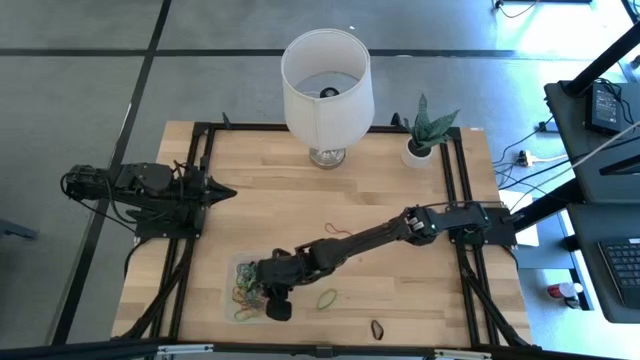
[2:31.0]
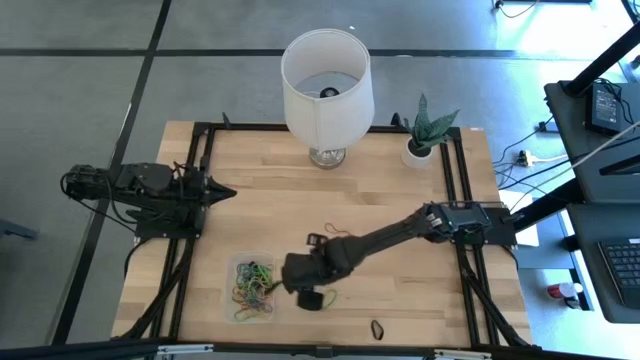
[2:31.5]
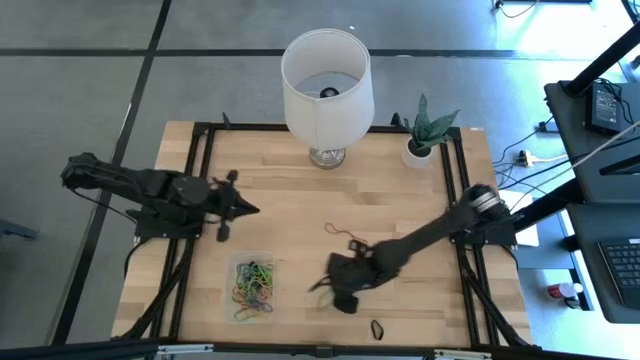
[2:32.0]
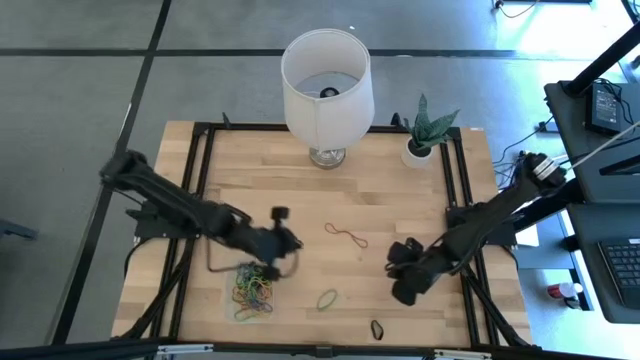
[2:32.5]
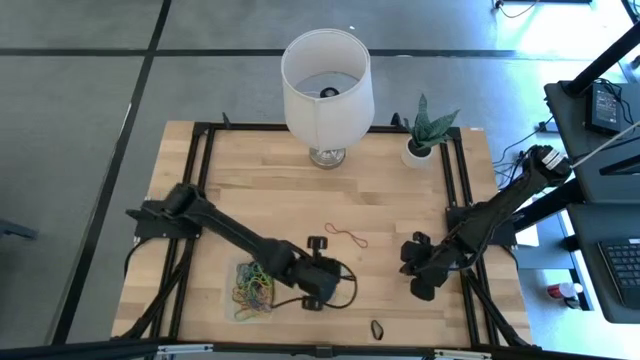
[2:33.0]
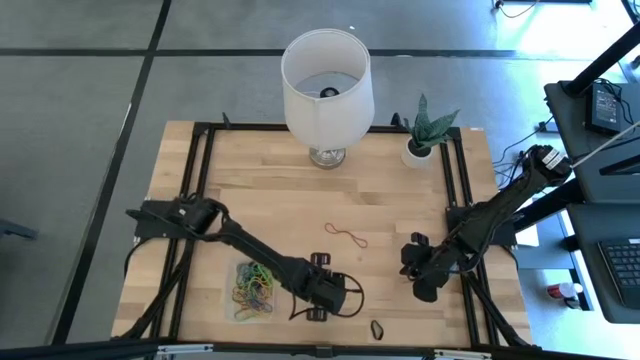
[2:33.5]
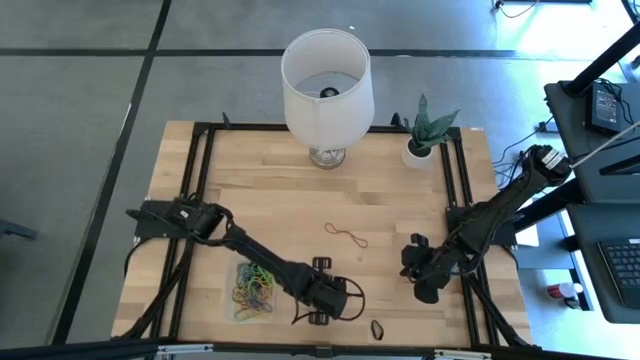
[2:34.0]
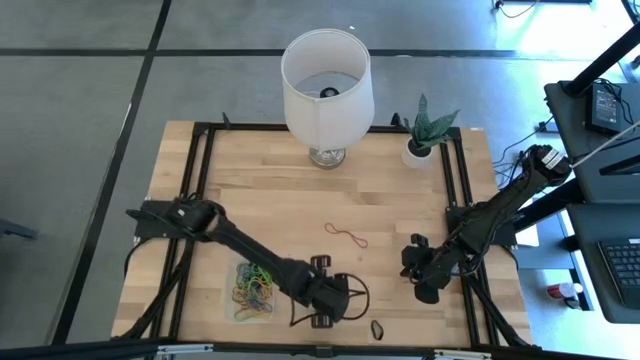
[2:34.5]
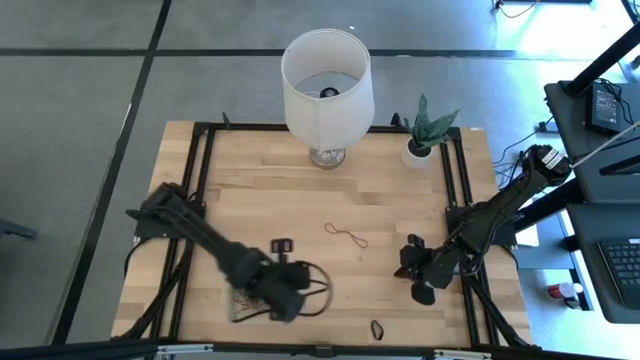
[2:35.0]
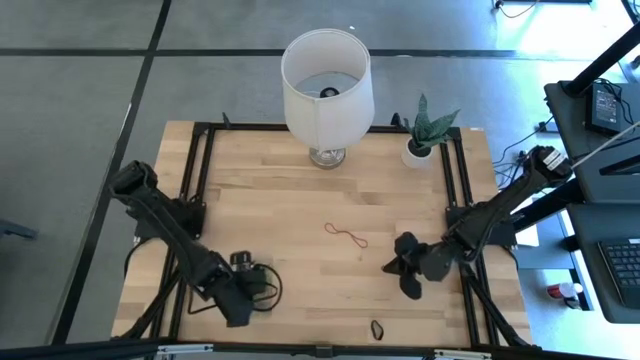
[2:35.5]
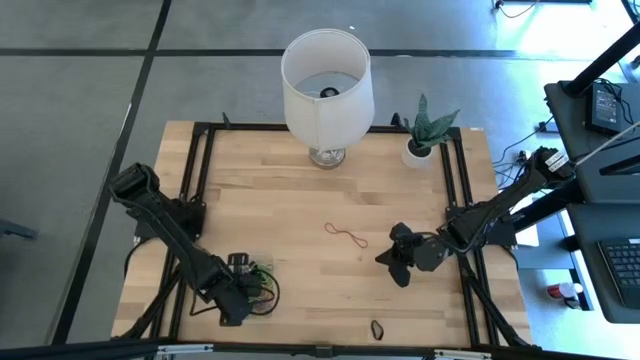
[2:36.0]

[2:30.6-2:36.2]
Task: Pick and place rubber bands into bin
Put the green rubber band into the transparent bin

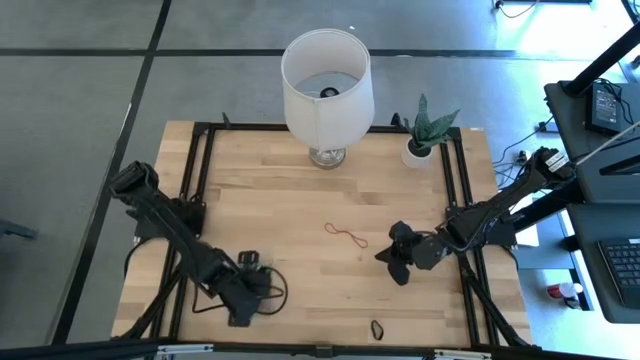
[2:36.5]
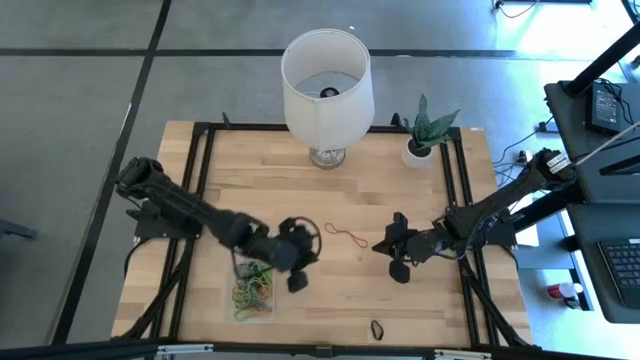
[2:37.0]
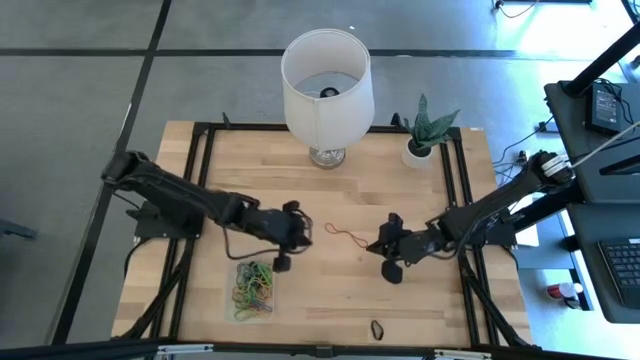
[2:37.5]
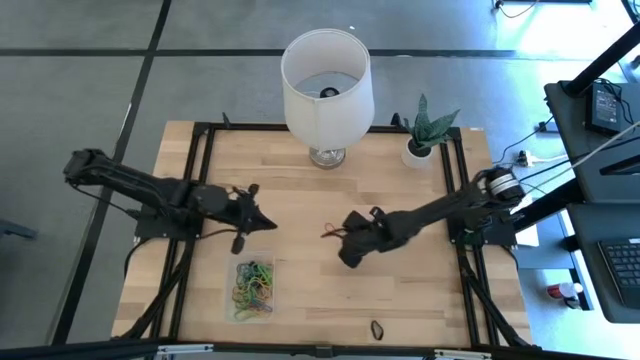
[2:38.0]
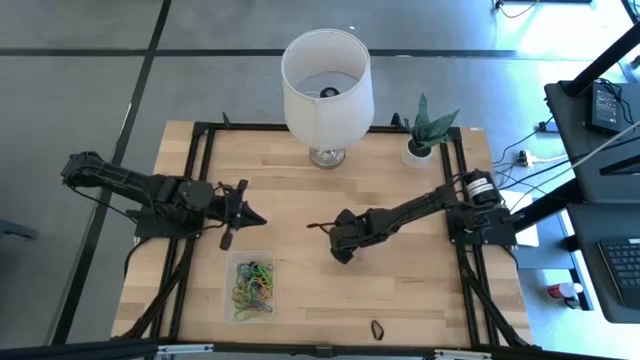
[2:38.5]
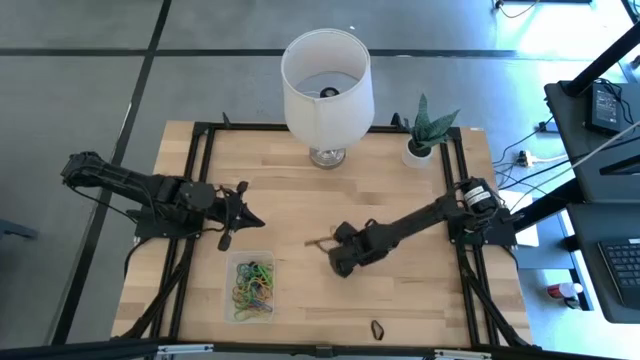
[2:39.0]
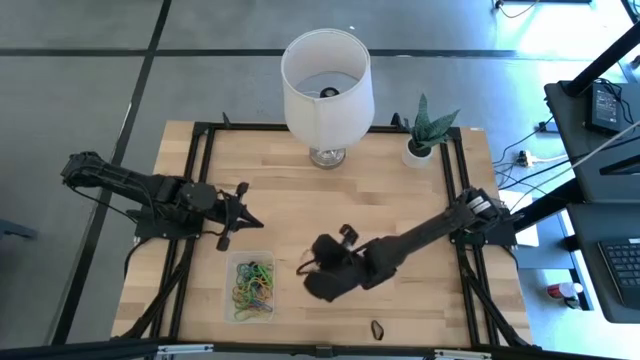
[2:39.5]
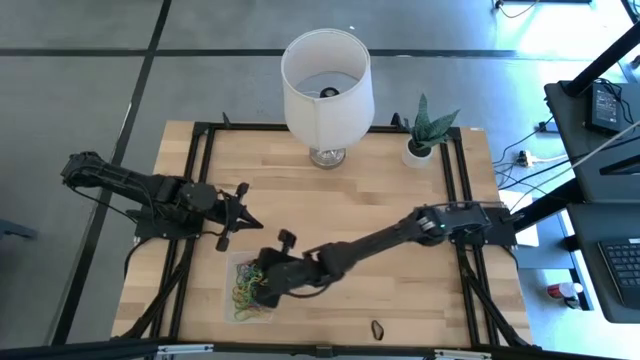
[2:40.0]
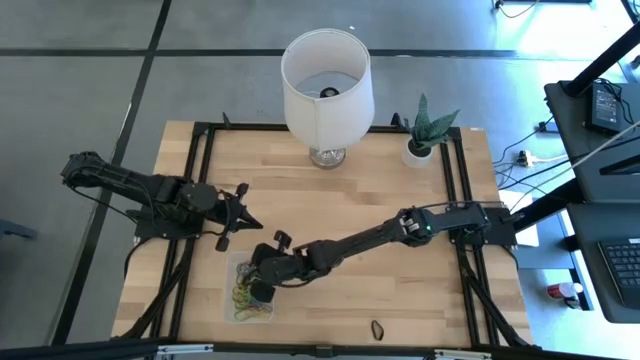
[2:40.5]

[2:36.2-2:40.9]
Put the red rubber band into the transparent bin

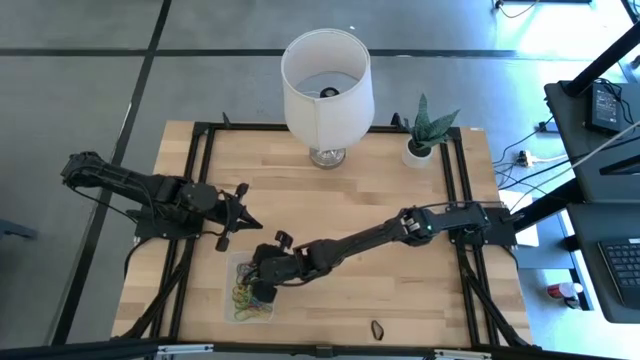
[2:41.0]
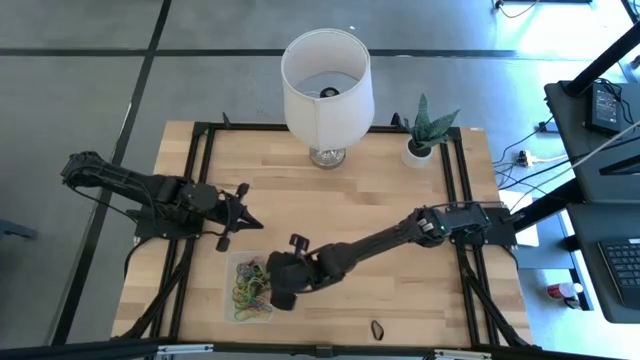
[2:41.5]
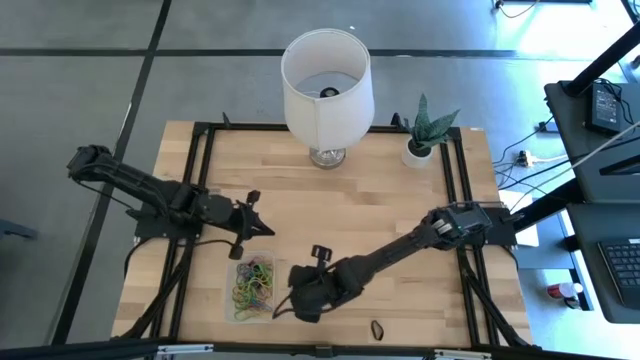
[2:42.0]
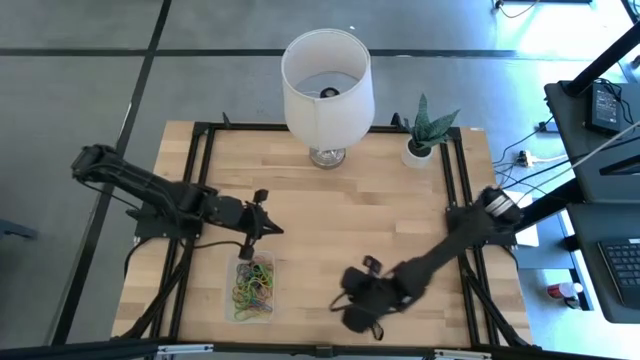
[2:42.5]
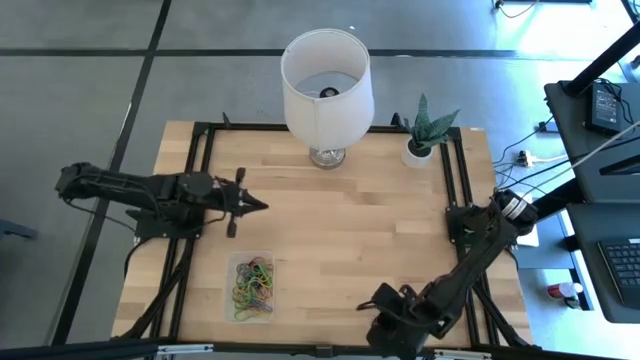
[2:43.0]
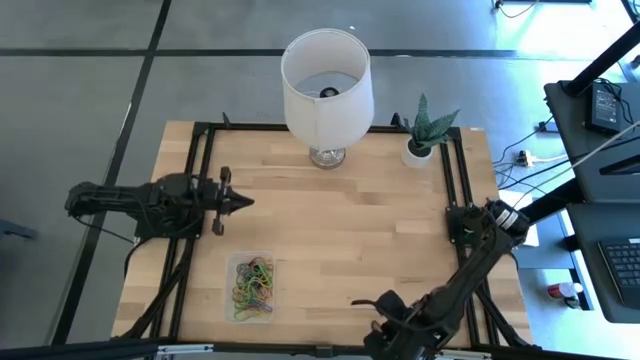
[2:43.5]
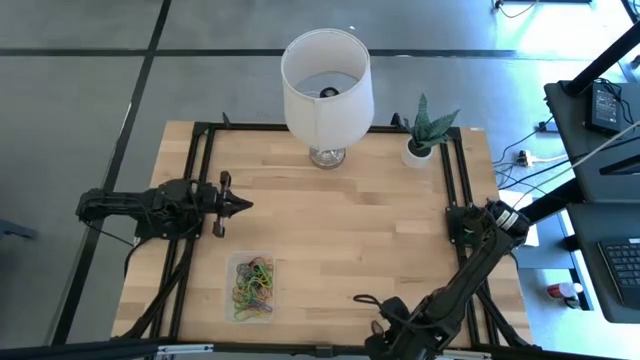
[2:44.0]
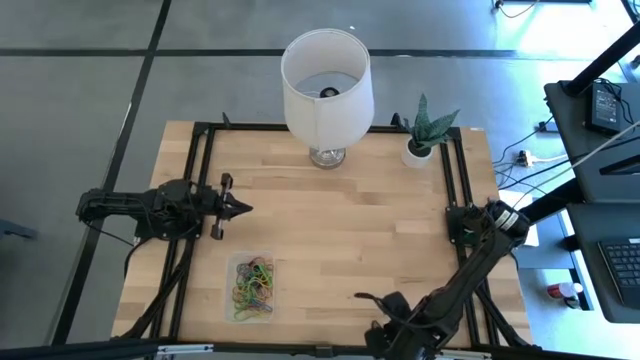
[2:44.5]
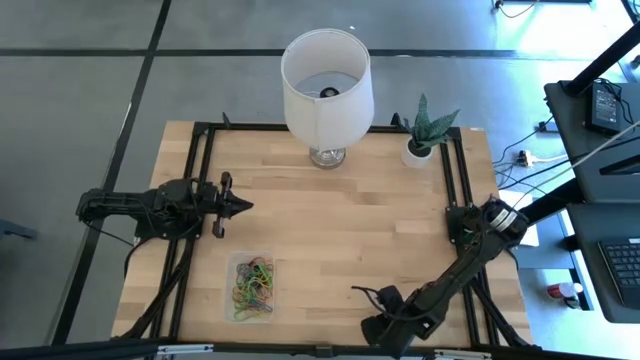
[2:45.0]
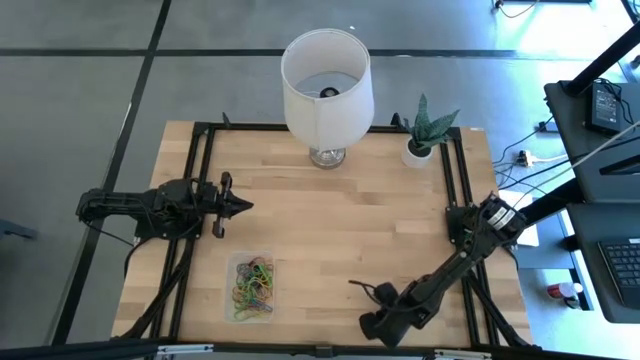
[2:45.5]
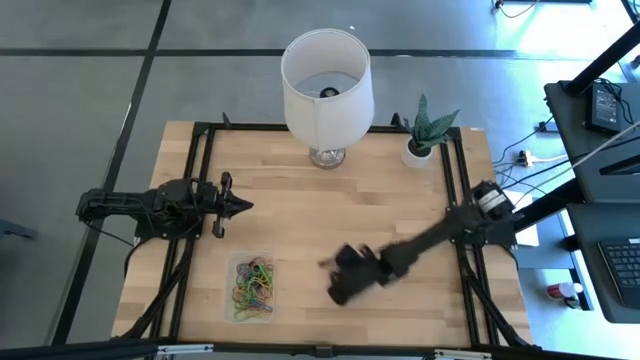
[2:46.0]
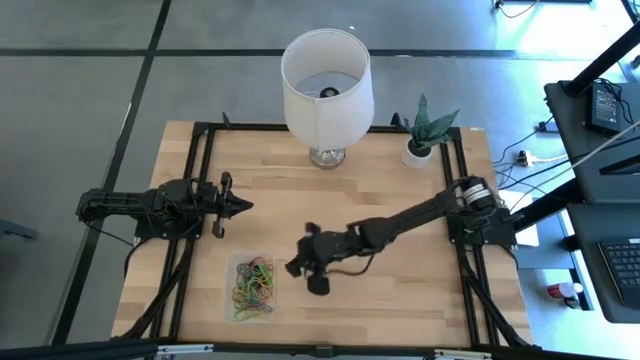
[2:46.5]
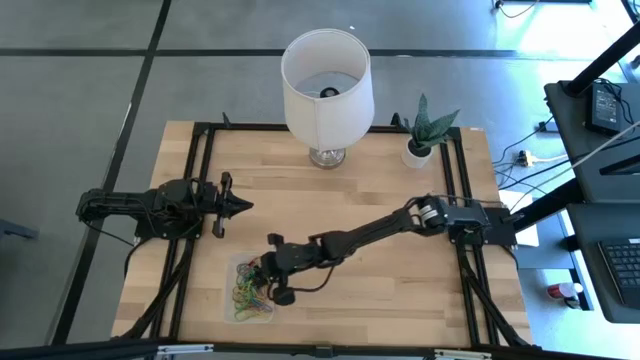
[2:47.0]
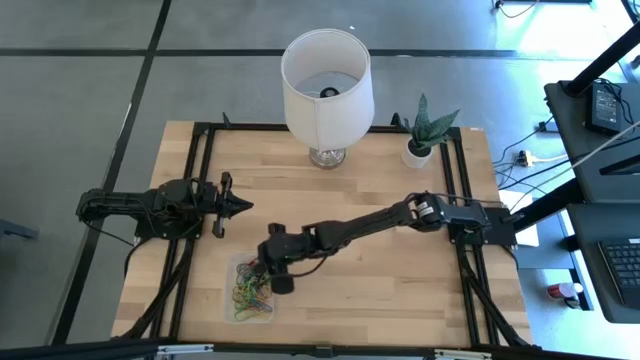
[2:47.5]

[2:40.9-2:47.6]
Put the black rubber band into the transparent bin

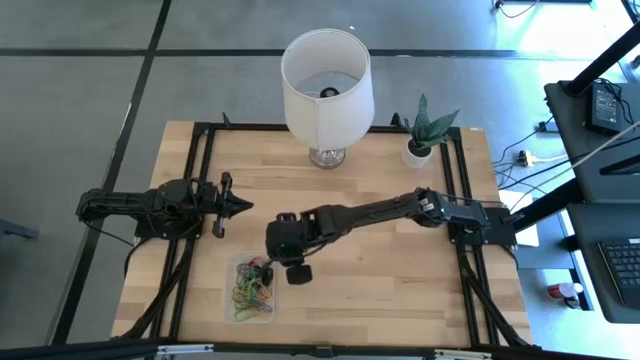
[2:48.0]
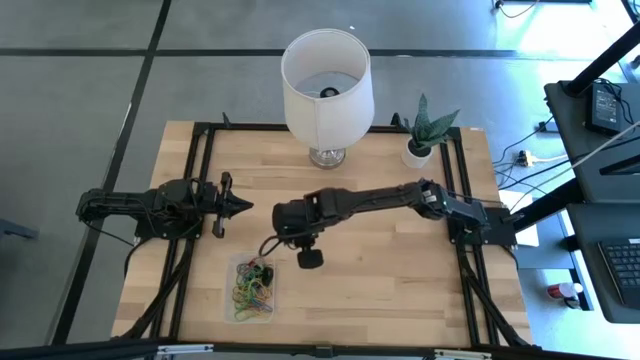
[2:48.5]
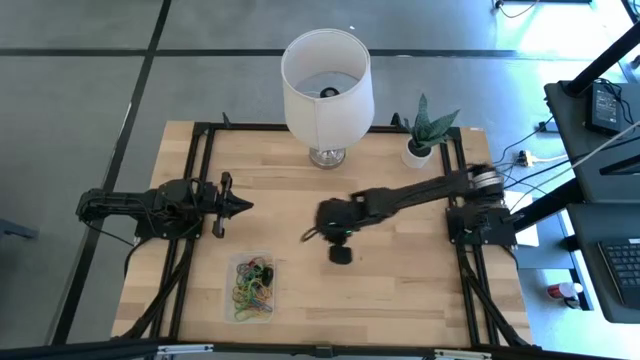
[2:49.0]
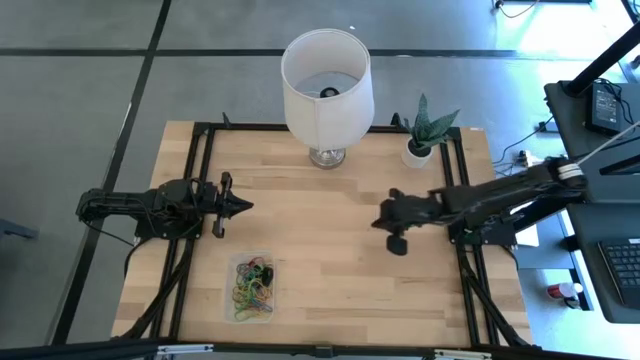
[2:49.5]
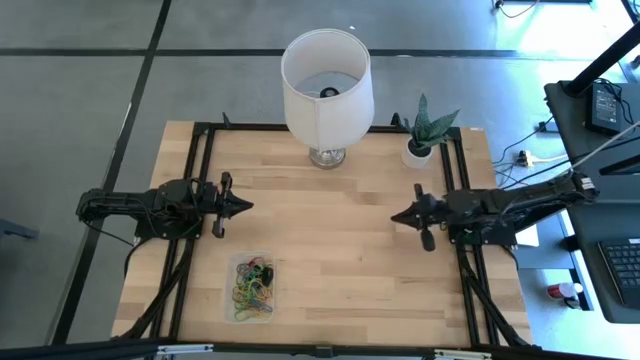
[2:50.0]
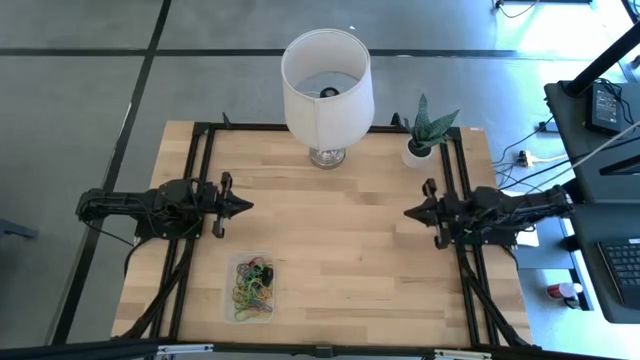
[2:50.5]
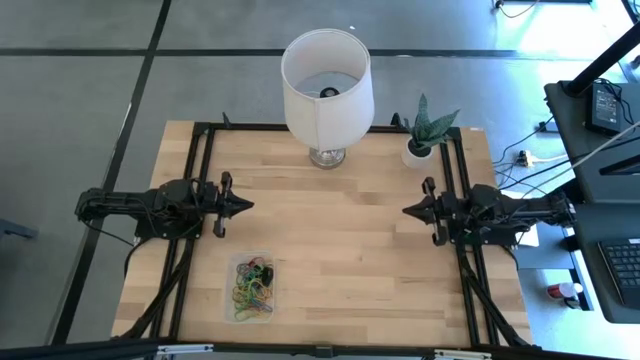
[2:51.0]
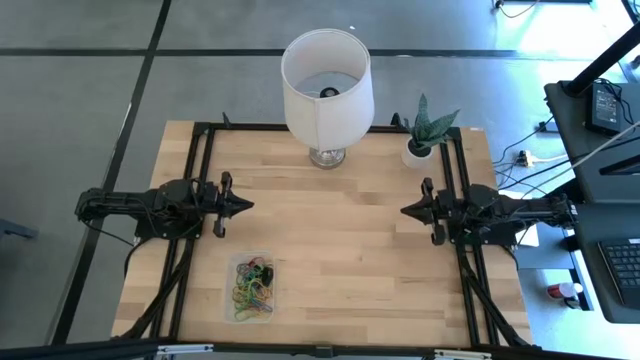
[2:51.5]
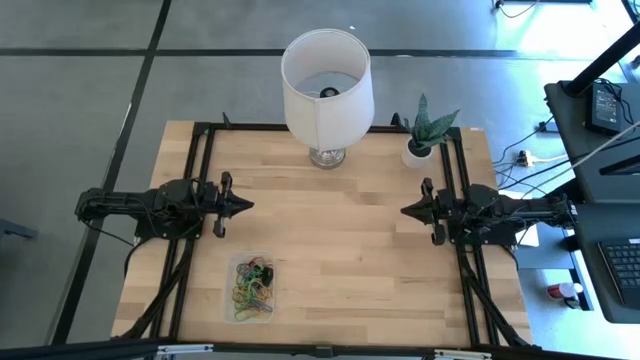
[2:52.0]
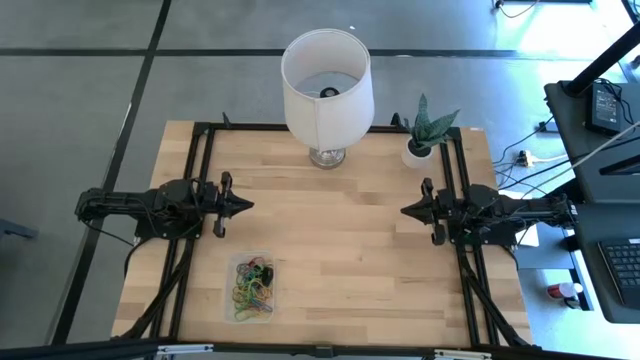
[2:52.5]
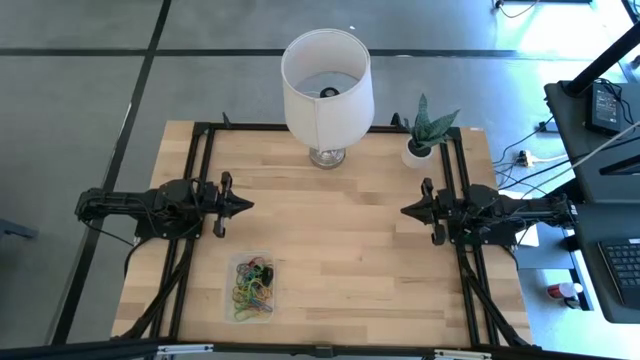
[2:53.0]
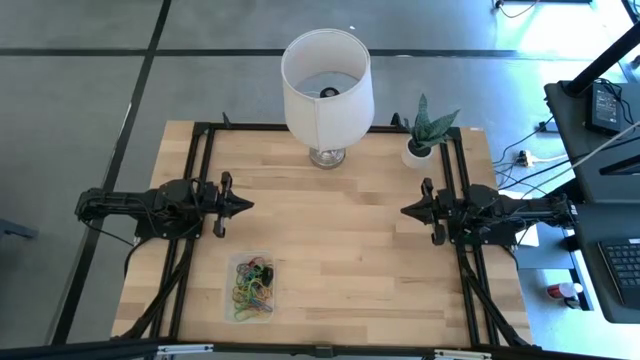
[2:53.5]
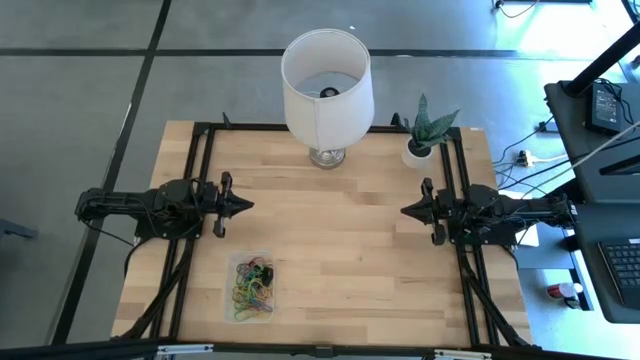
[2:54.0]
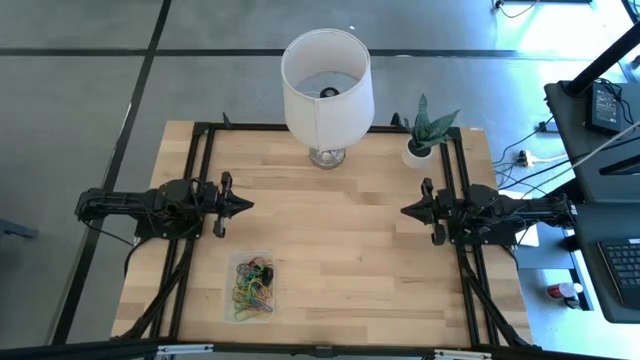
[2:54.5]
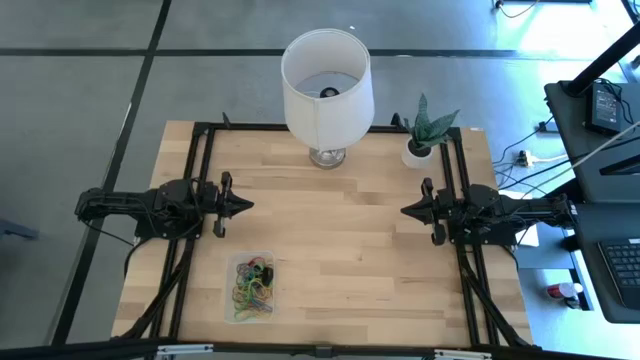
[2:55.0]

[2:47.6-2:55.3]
Return to Home Position
